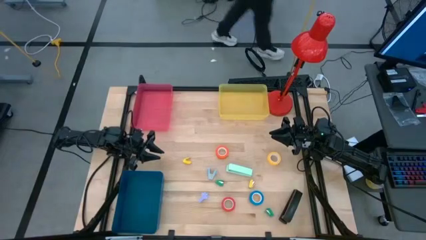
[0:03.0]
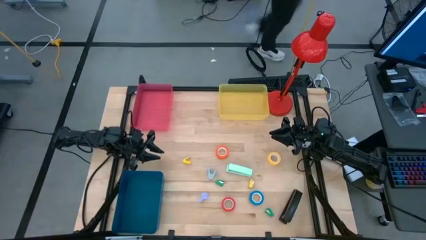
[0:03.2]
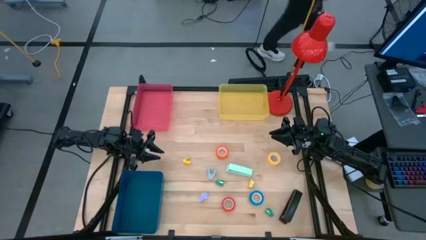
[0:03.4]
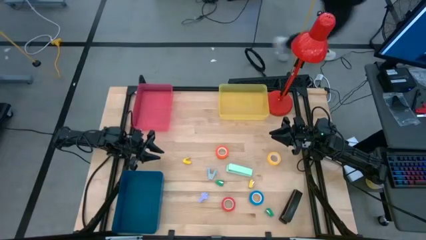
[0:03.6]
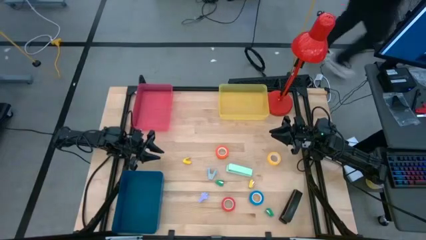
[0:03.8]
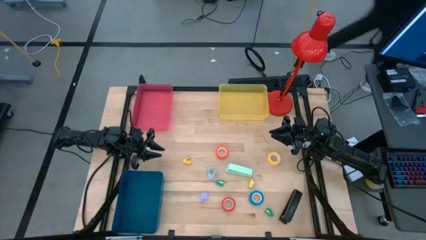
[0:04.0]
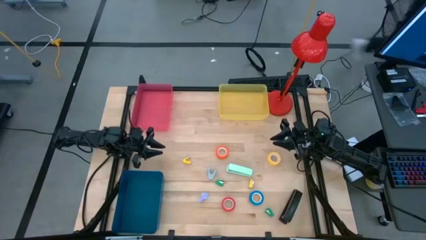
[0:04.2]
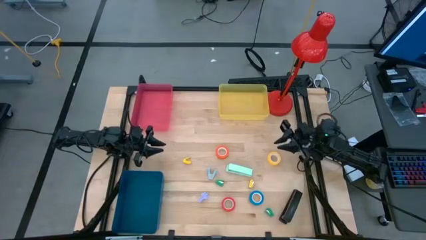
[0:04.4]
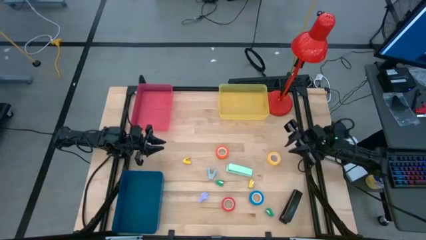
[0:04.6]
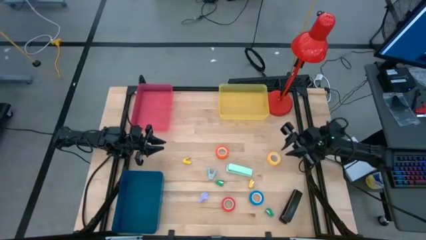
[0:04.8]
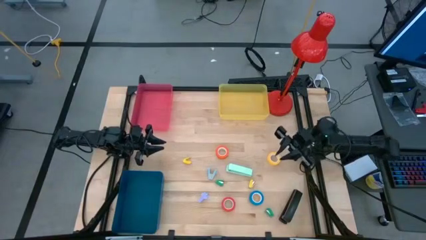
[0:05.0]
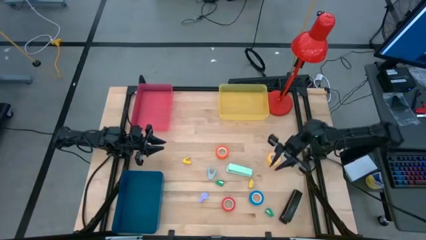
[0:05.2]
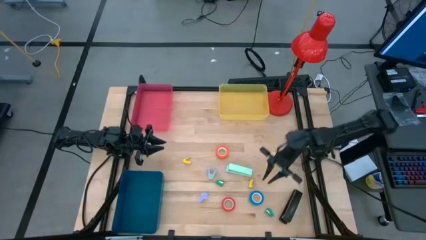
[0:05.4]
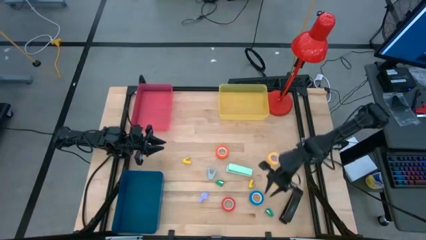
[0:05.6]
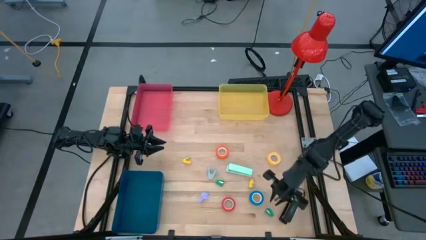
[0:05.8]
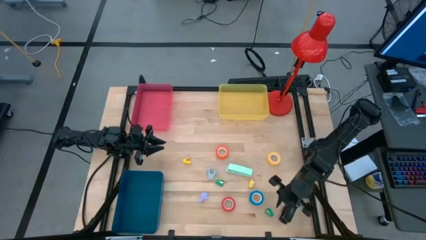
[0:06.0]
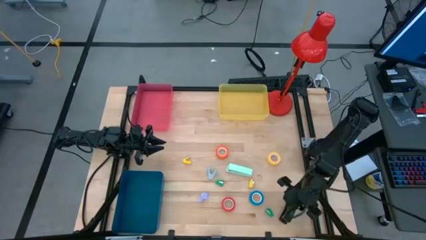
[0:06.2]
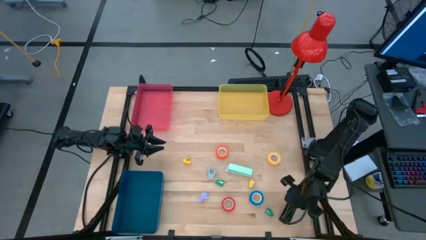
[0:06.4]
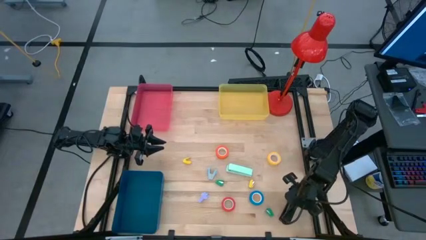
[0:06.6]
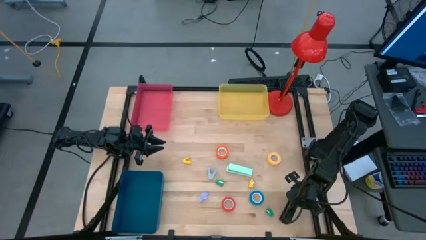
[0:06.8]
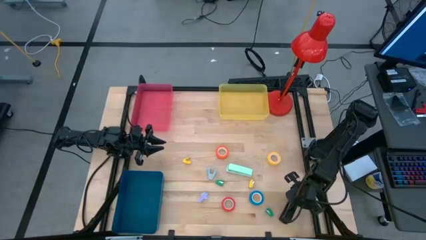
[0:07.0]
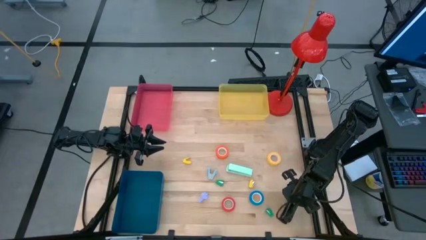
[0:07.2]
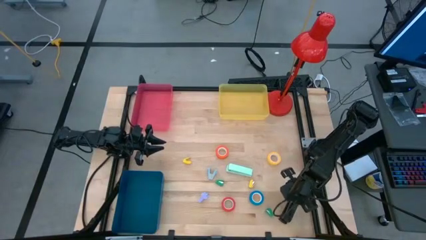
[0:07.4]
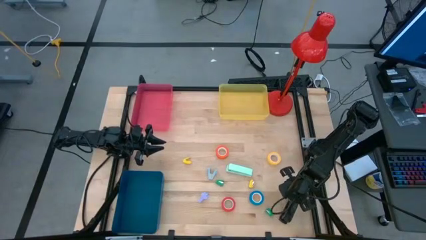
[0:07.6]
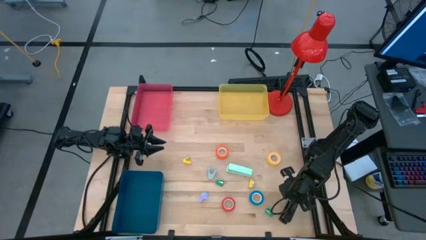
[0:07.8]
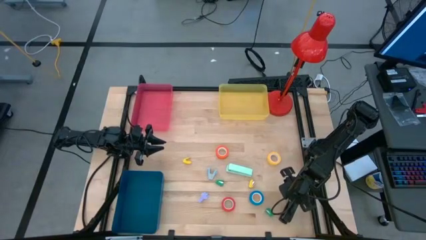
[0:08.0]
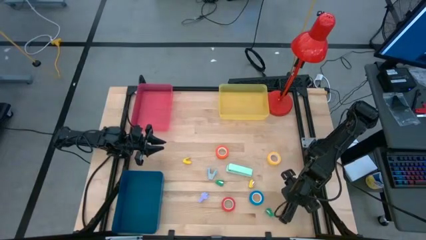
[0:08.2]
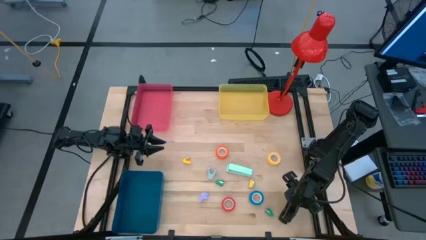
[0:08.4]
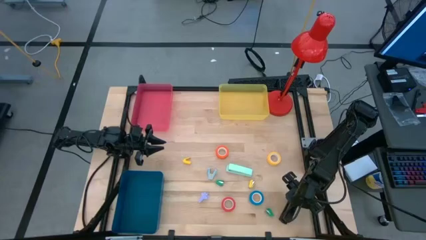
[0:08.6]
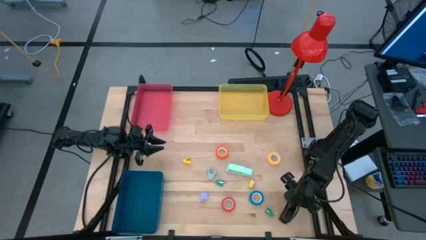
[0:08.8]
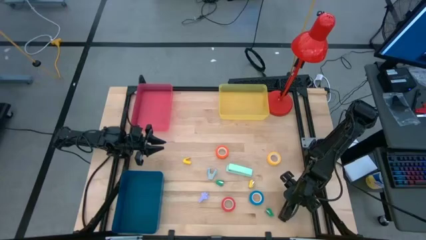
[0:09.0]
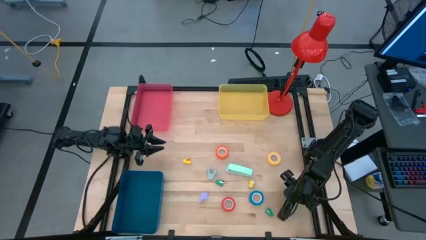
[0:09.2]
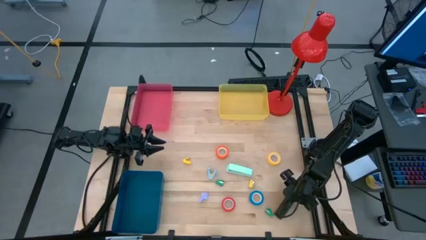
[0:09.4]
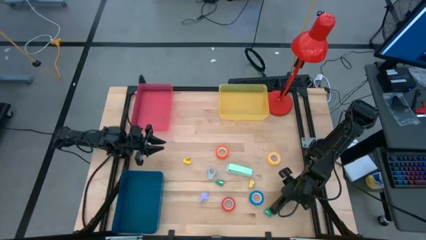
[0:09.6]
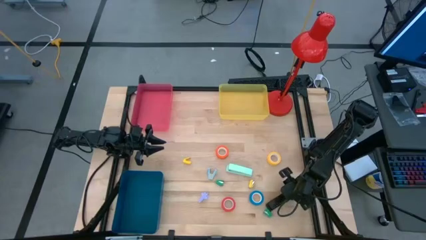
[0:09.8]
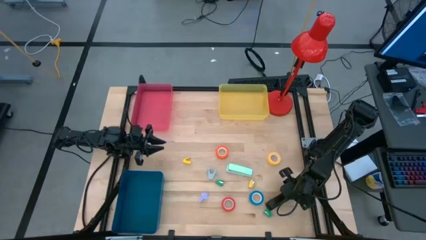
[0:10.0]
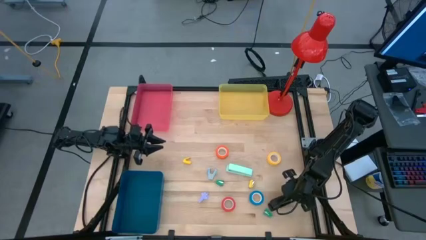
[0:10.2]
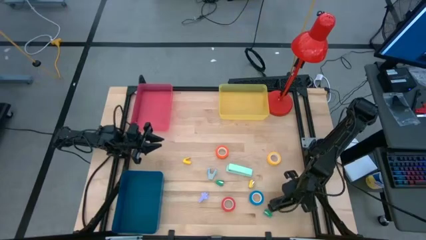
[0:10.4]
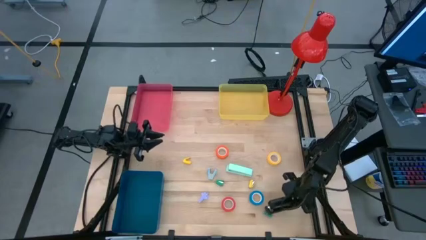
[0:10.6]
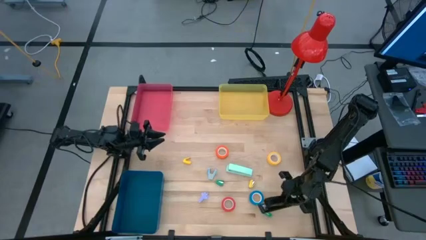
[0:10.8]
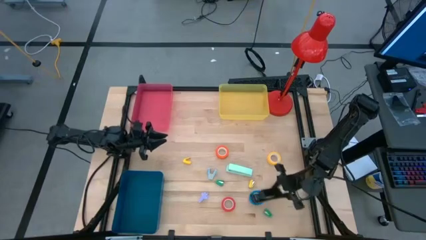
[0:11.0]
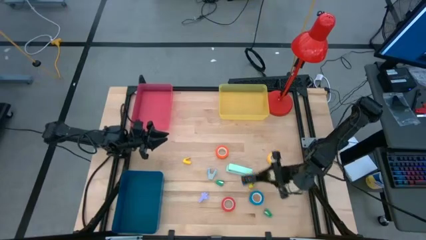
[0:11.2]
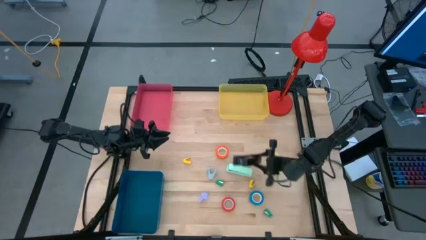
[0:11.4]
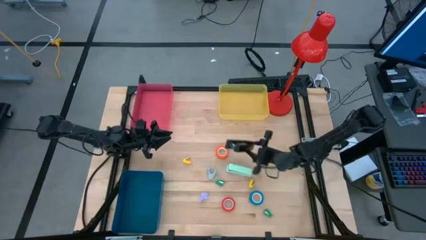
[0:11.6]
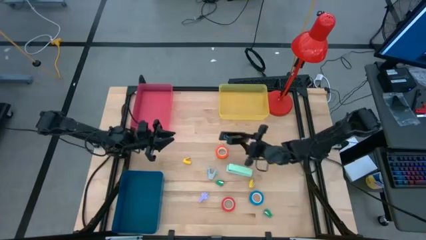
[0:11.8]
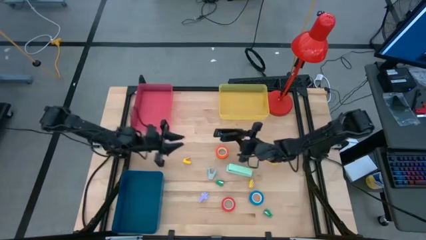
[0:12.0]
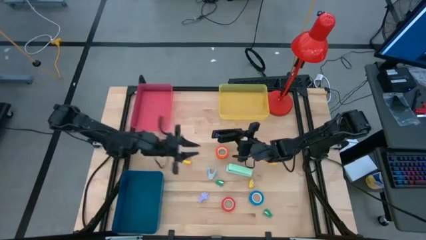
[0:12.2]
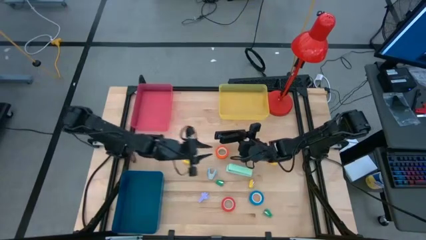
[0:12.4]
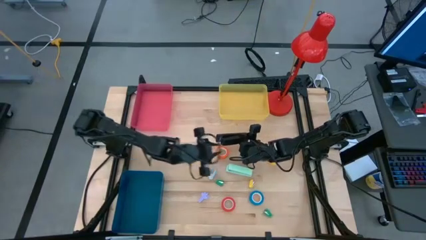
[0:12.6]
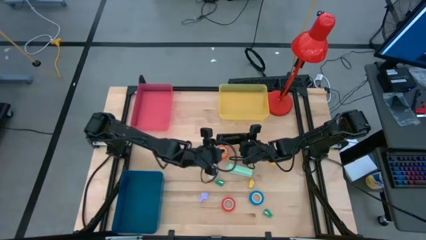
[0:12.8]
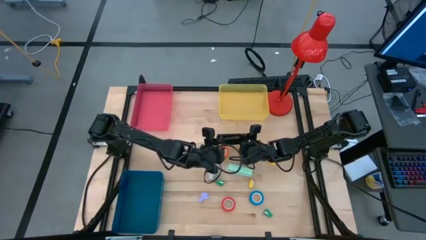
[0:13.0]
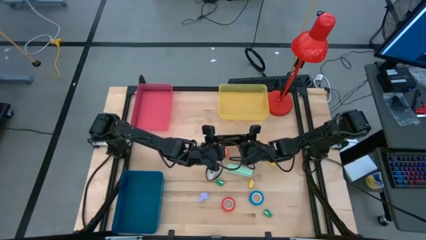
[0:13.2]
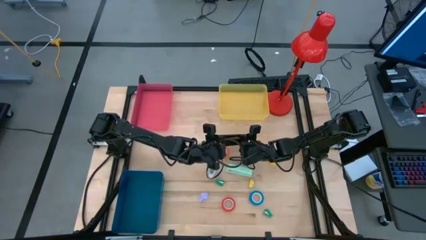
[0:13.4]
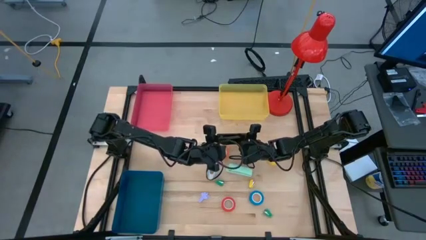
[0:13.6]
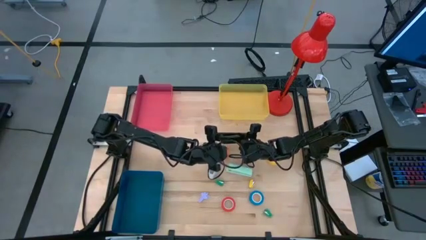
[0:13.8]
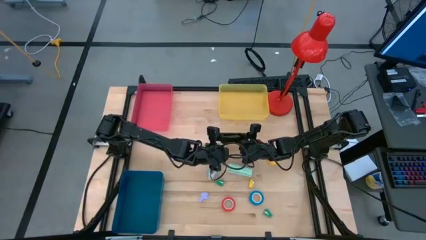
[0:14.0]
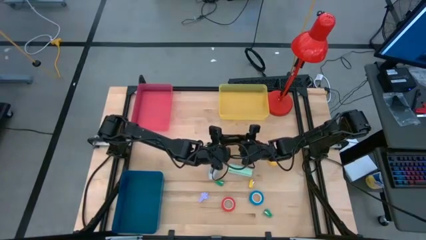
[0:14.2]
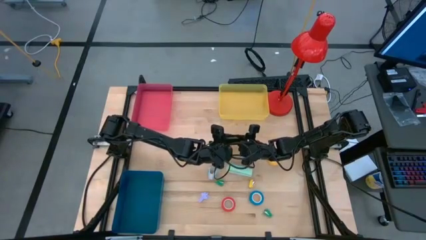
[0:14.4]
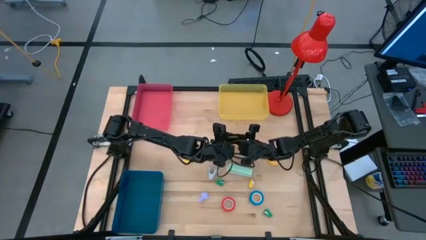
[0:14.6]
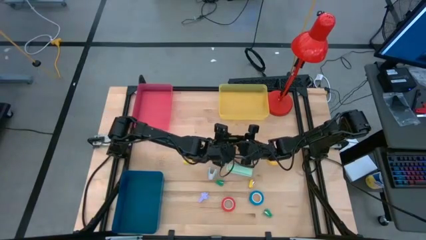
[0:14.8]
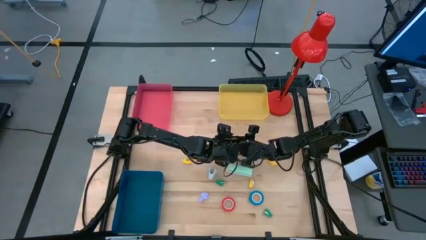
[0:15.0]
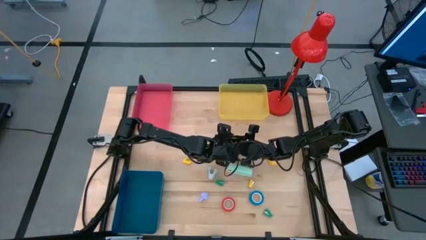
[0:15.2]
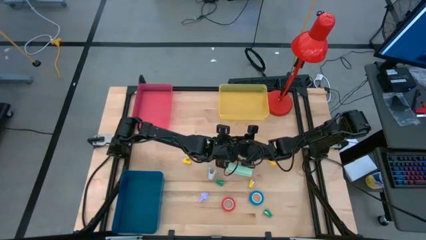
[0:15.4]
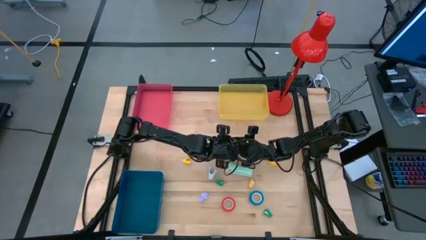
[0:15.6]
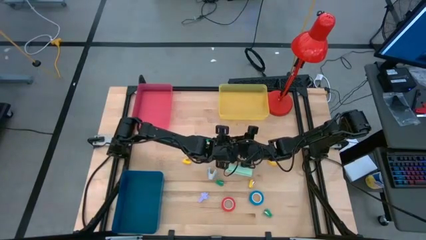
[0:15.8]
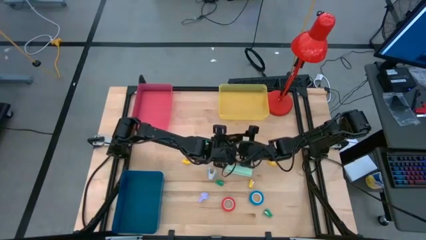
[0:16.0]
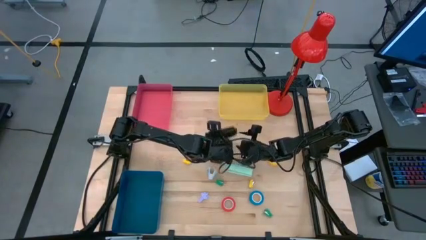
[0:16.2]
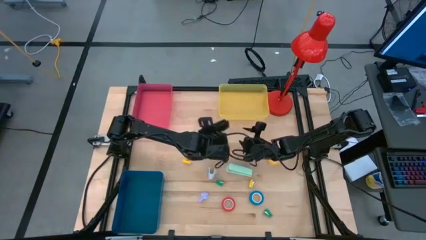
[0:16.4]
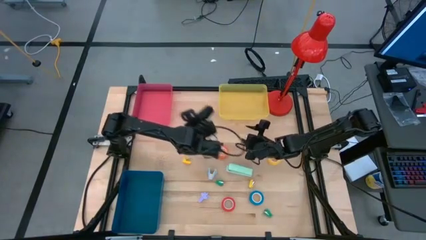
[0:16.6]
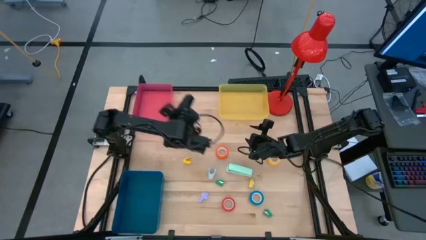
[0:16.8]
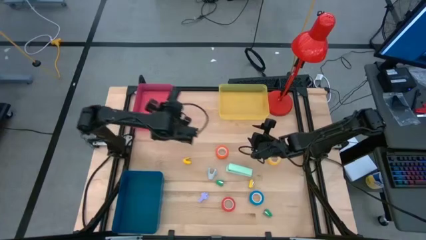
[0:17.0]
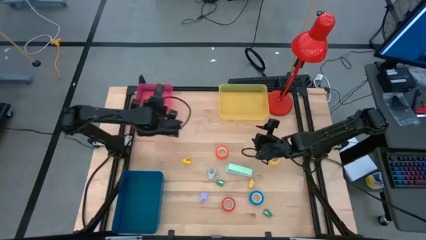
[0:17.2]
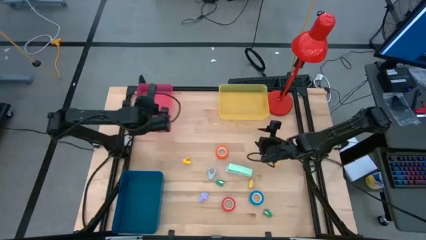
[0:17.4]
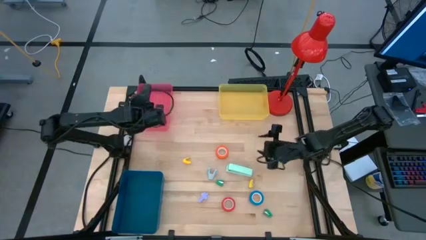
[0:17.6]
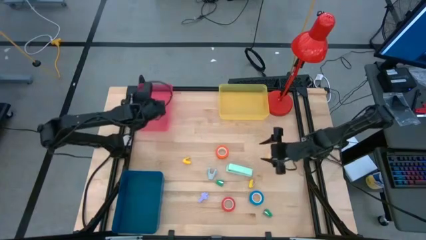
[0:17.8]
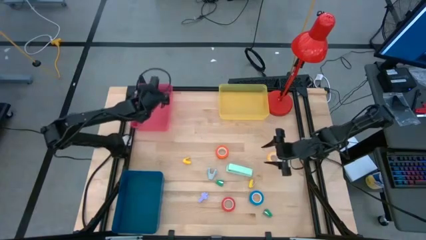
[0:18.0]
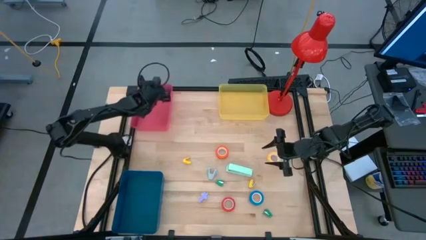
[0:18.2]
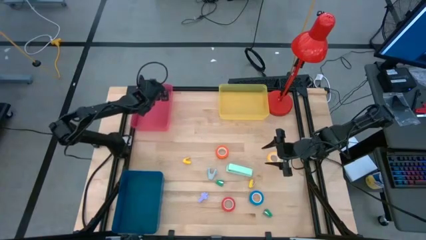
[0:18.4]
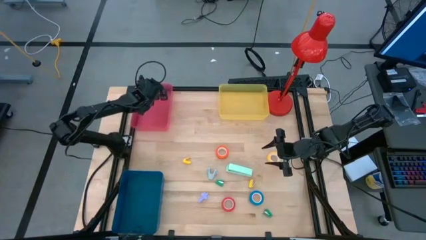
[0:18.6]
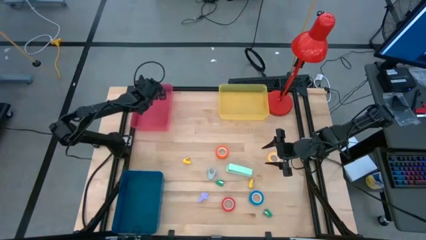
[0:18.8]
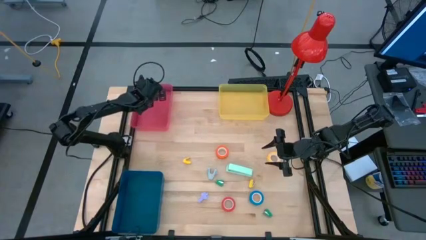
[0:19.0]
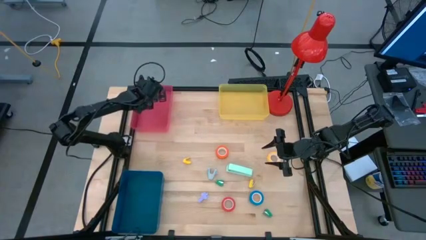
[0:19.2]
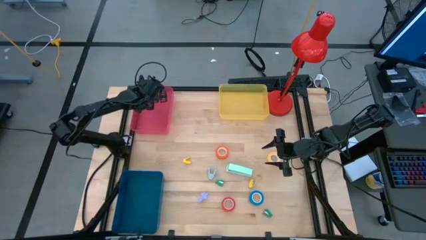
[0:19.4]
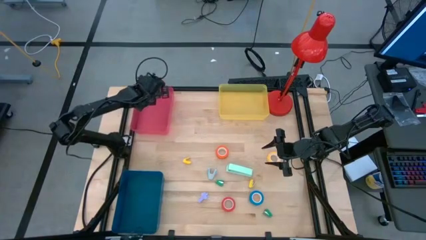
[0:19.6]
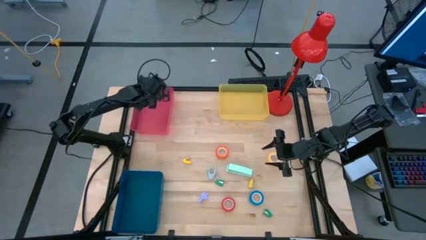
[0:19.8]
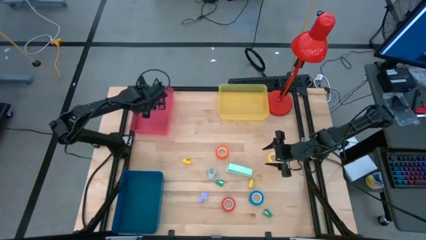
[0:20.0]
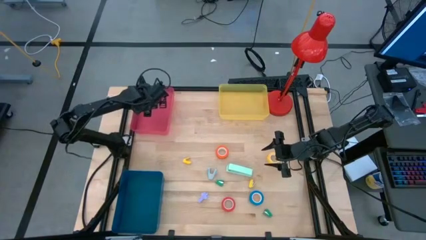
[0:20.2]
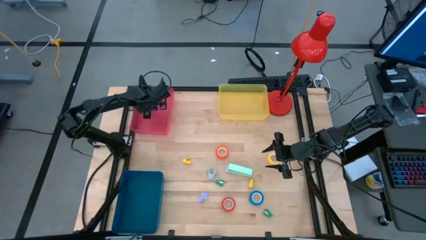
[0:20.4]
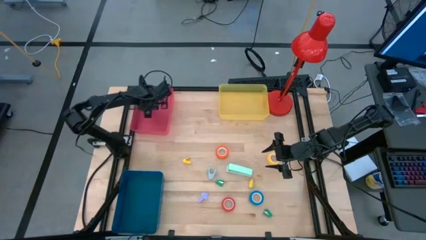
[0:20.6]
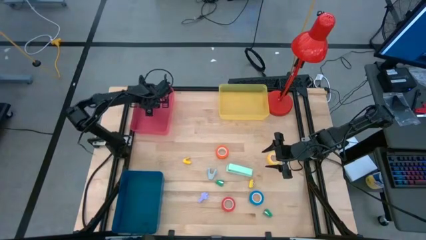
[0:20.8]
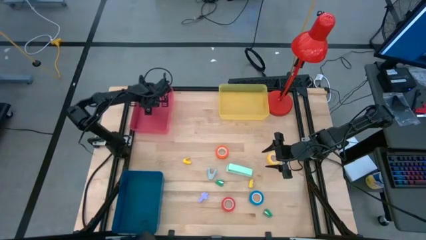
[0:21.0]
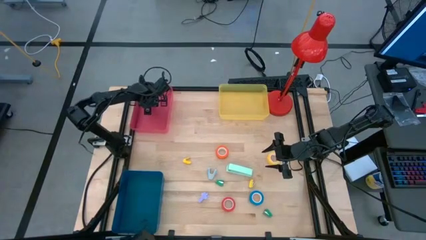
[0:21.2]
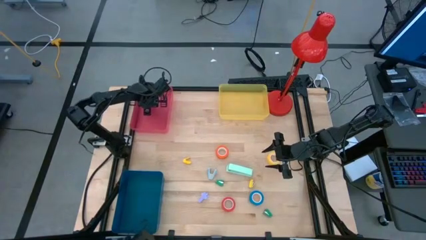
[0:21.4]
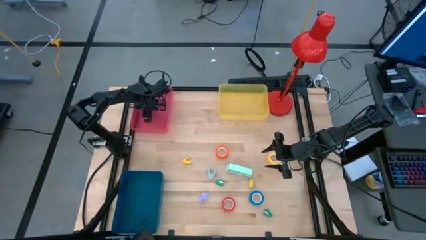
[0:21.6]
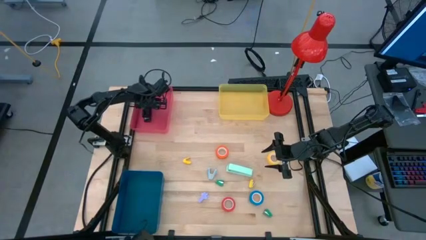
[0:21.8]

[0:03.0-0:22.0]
Task: Pick and place Stapler, Stapler remover, tape
Put the black stapler into the pink bin
